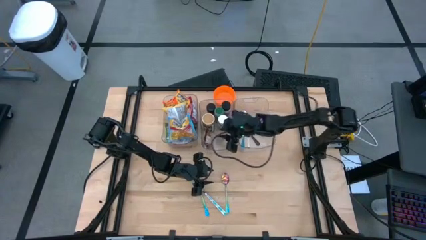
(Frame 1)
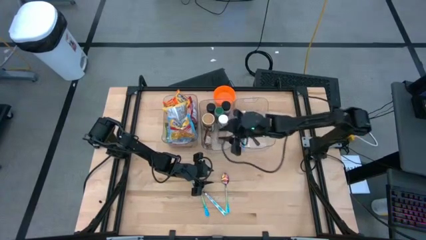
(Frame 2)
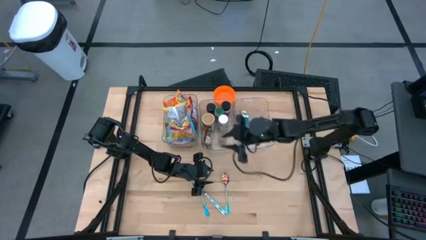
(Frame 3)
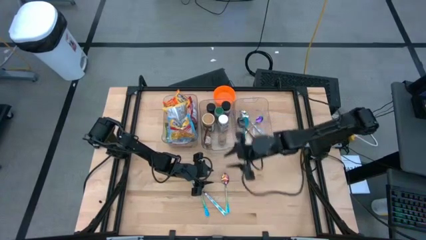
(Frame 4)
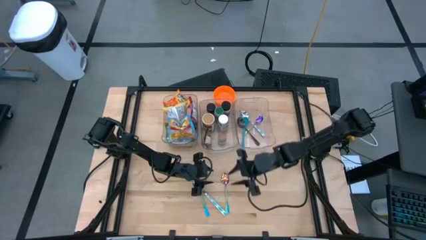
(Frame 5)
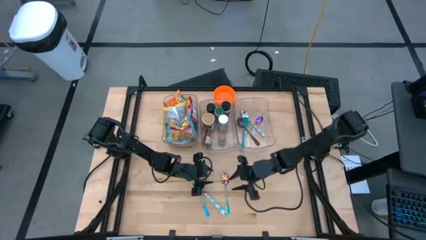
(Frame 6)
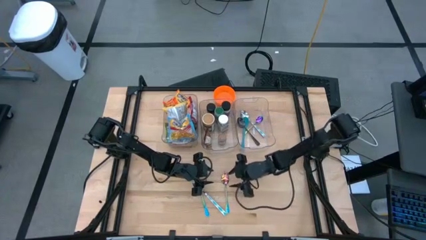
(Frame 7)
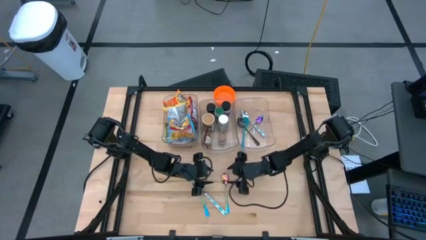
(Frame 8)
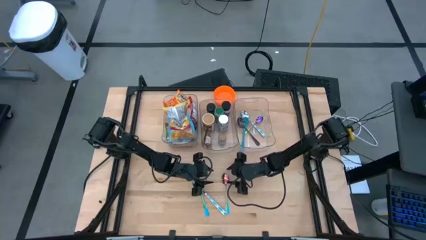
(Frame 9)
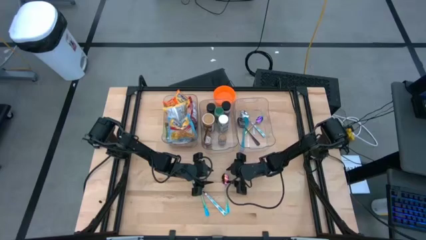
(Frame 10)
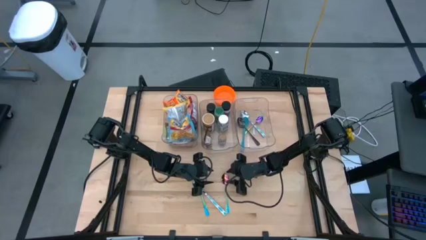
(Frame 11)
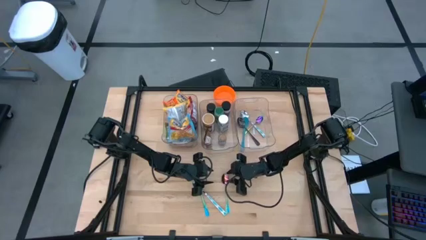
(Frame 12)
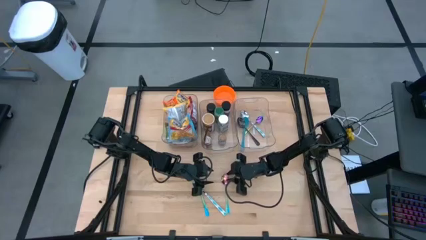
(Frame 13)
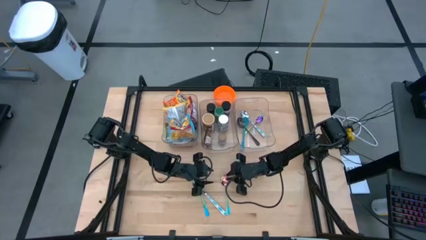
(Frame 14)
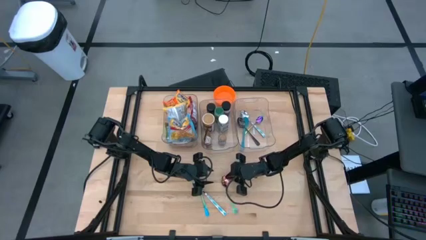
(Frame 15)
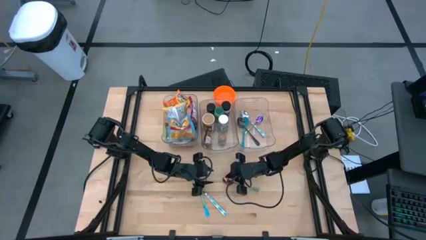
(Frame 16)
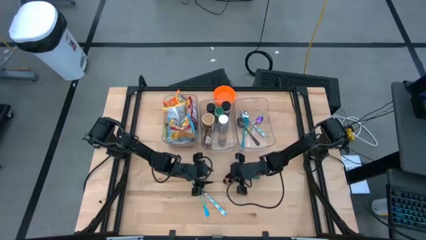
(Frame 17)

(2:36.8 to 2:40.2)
Task: Pick & Place Food Item
Put the green spoon into the right transparent bin

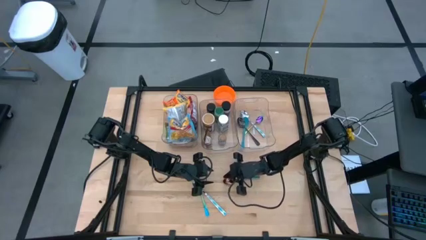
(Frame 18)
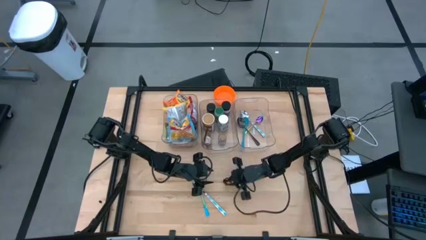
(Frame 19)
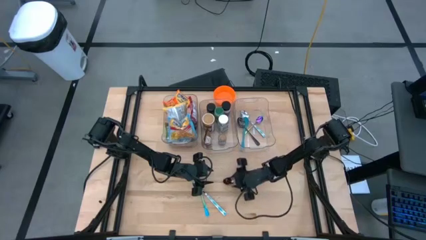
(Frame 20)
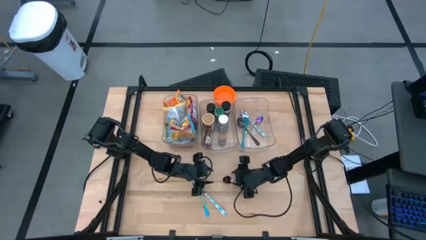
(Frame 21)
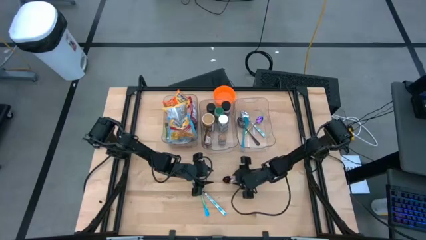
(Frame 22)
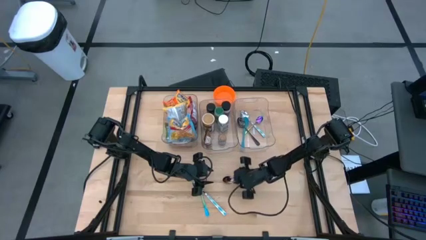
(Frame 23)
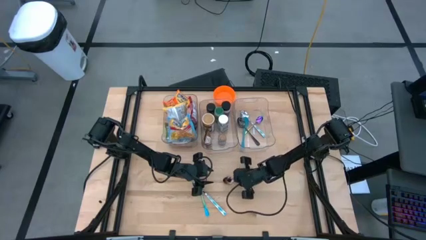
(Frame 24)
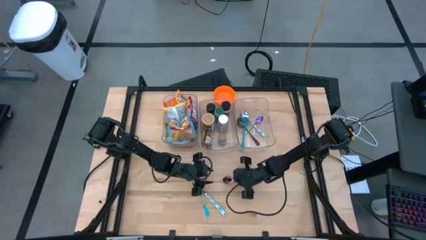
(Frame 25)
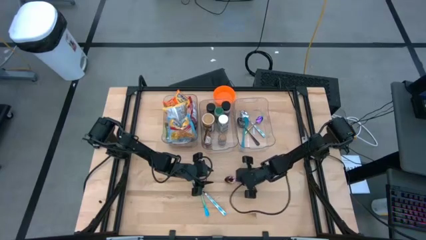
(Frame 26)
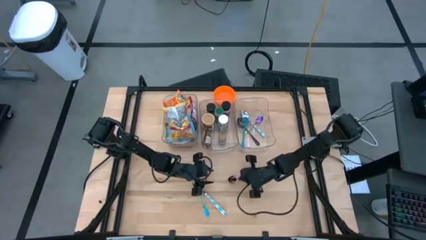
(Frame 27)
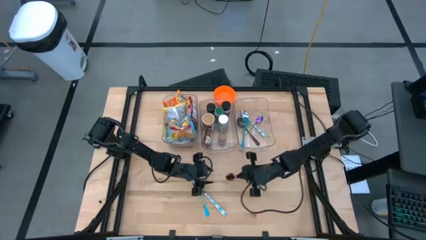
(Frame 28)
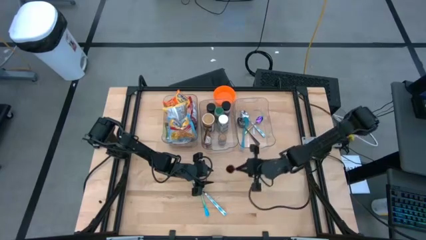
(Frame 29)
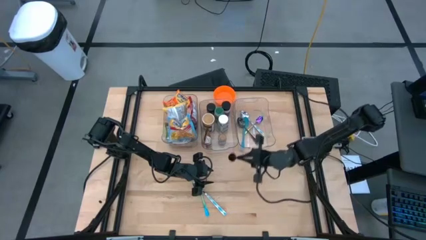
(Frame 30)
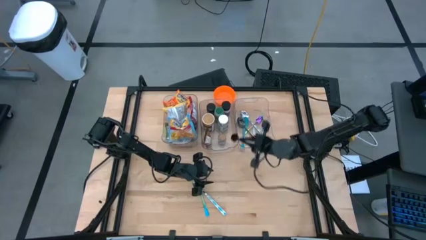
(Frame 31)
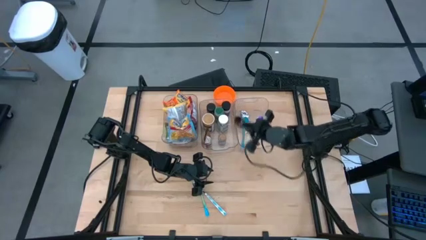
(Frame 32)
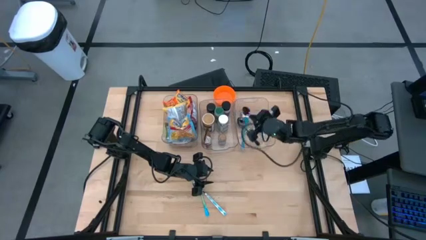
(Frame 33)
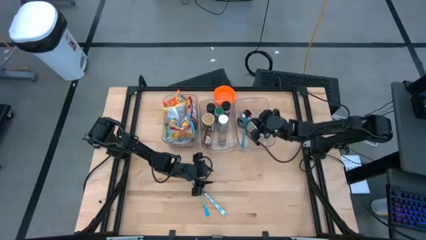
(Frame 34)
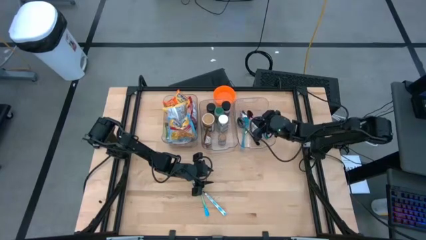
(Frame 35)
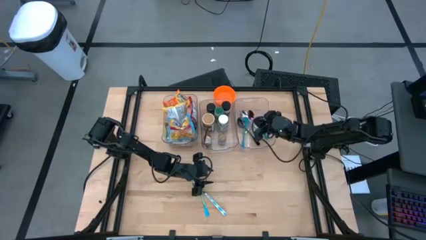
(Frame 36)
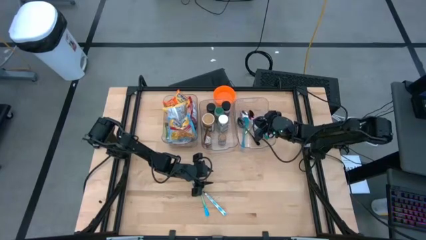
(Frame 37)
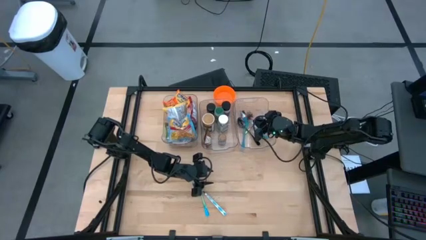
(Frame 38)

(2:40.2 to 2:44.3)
Put the green spoon into the right transparent bin

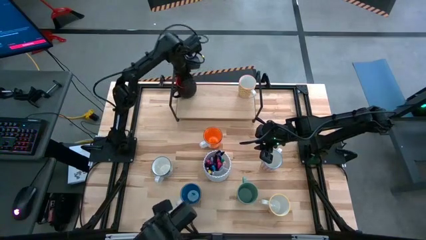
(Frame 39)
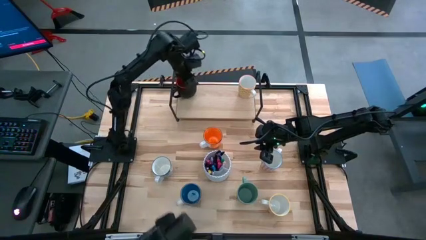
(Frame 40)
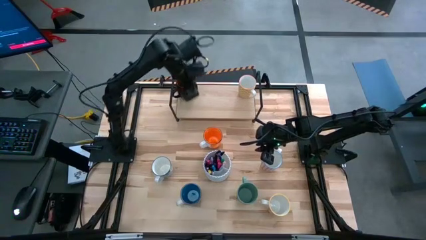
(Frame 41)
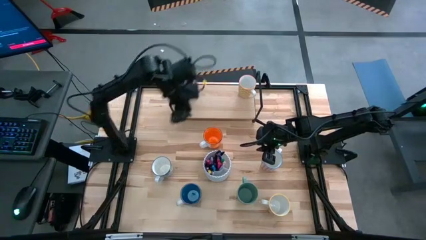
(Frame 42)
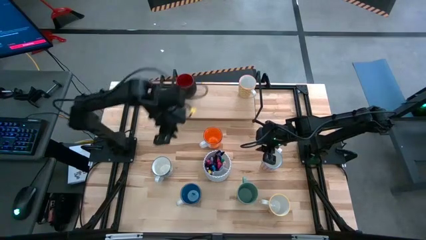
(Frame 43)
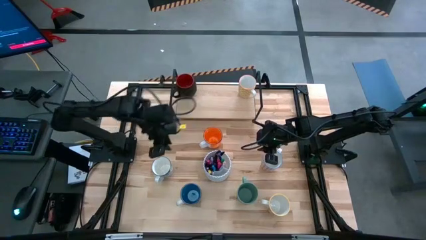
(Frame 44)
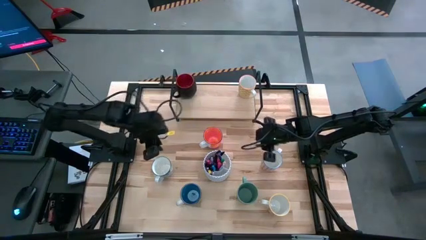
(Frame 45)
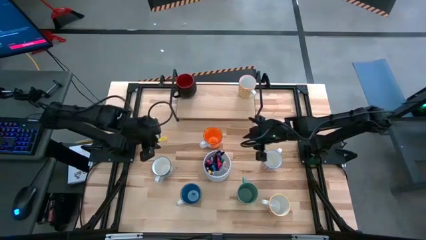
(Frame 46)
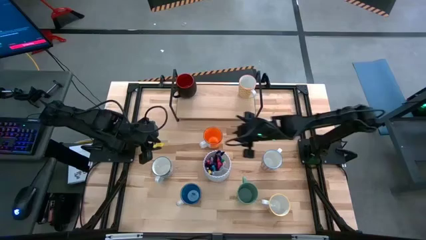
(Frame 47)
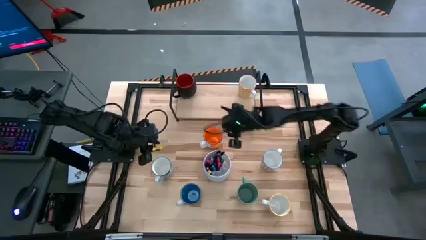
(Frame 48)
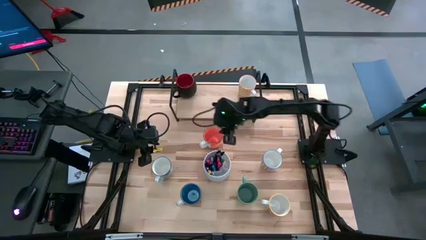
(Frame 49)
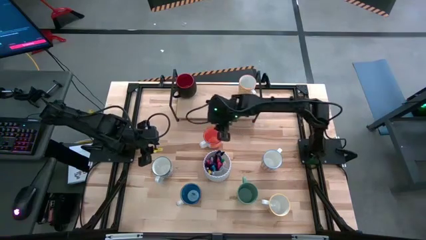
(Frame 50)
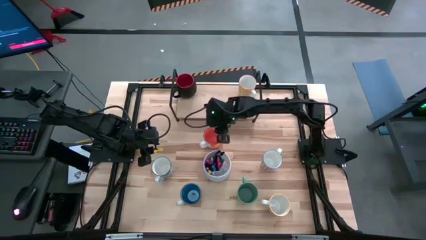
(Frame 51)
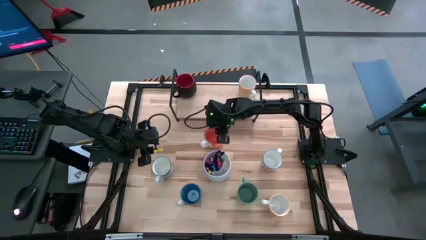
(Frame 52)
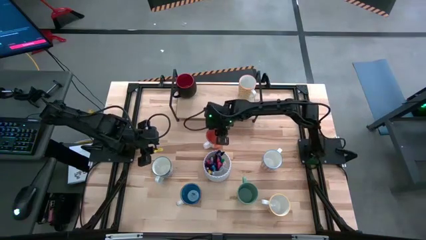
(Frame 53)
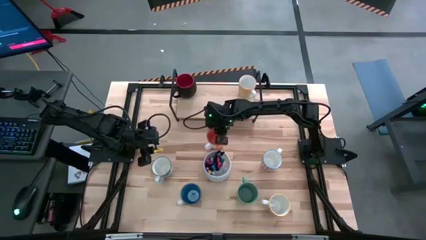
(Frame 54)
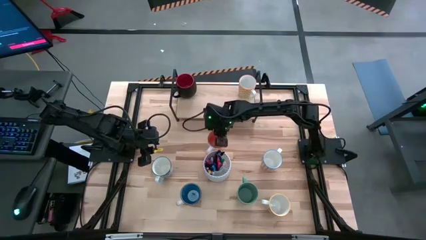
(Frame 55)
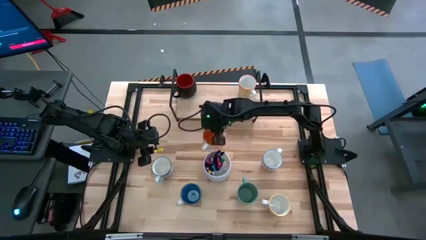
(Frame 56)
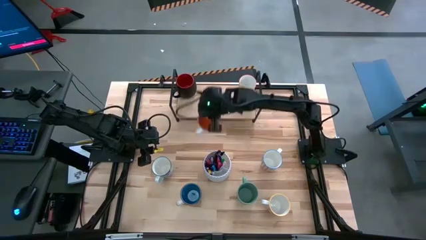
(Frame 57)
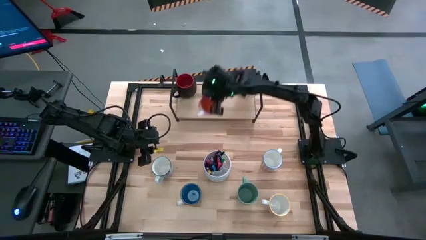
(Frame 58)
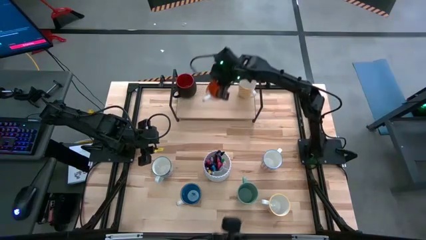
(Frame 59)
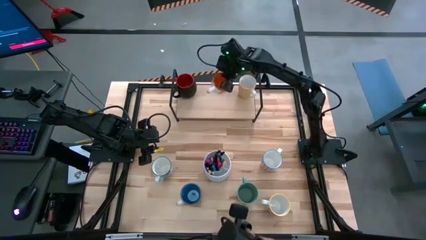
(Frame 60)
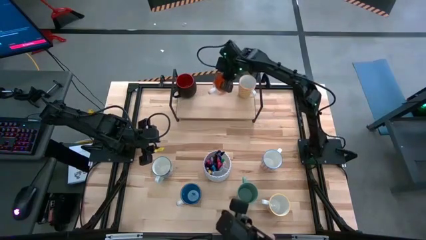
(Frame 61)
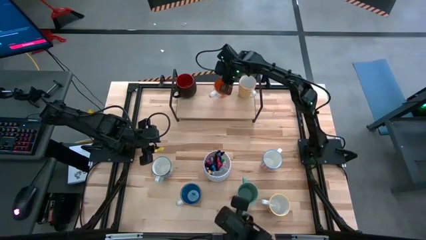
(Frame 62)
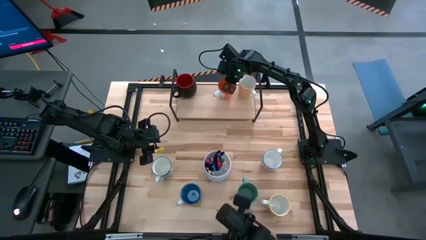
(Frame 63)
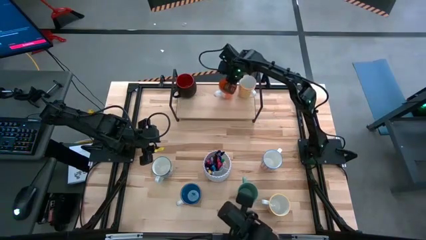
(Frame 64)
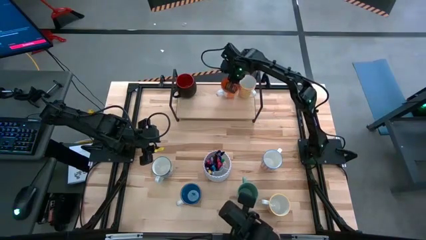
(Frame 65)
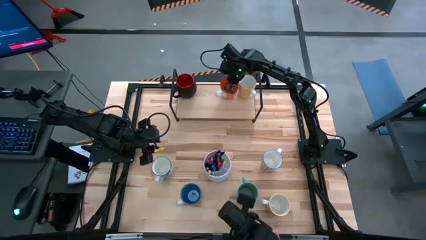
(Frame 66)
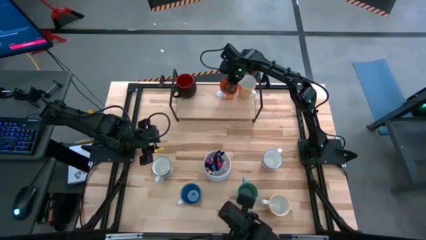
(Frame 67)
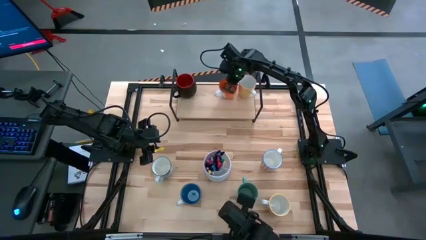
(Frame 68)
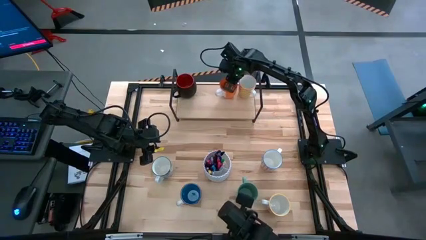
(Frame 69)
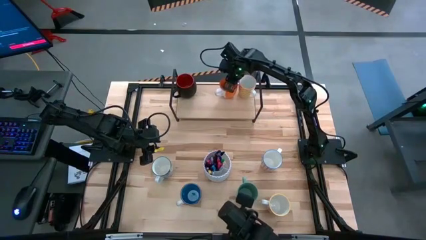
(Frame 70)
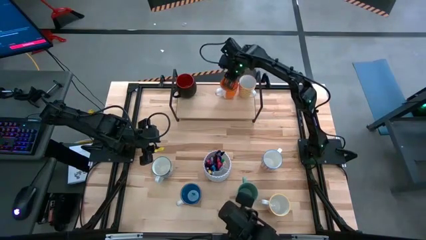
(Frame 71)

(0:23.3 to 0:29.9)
Task: Place coffee mugs
Put the orange mug on the shelf

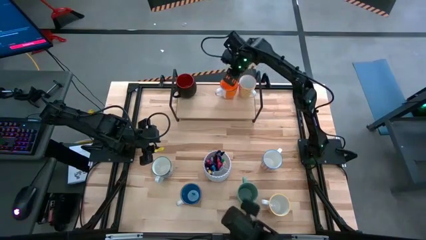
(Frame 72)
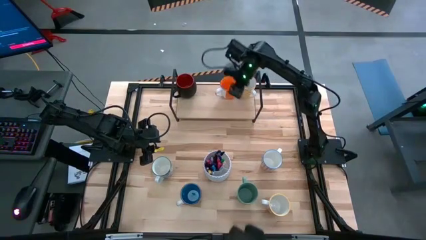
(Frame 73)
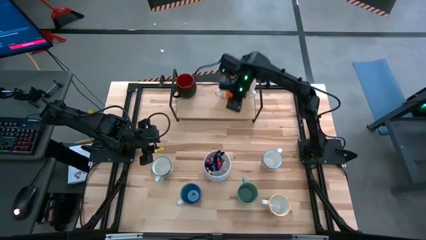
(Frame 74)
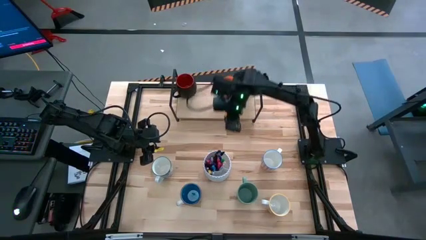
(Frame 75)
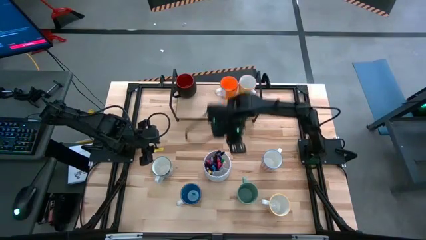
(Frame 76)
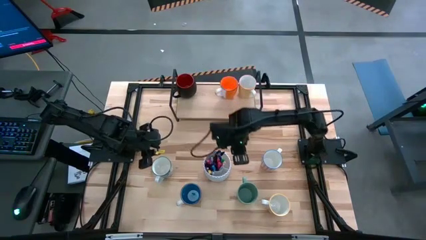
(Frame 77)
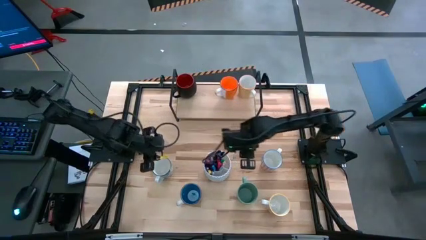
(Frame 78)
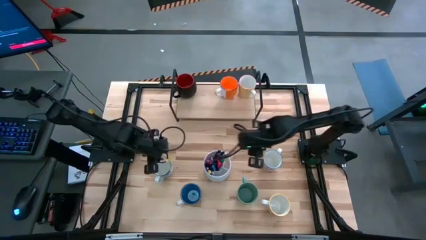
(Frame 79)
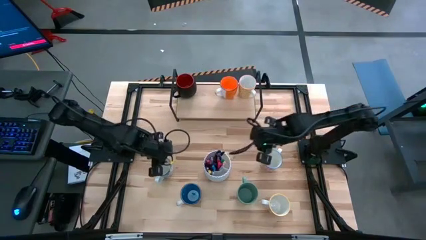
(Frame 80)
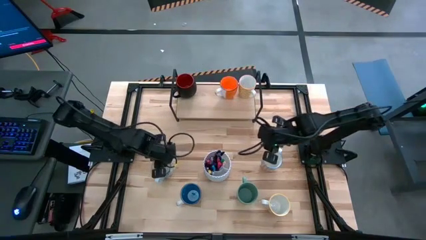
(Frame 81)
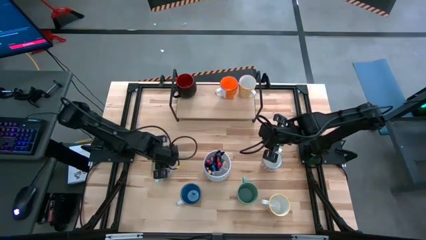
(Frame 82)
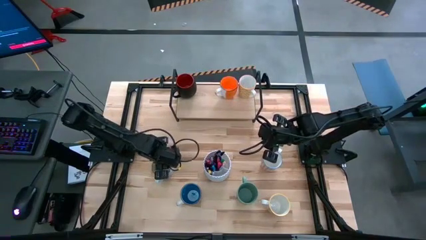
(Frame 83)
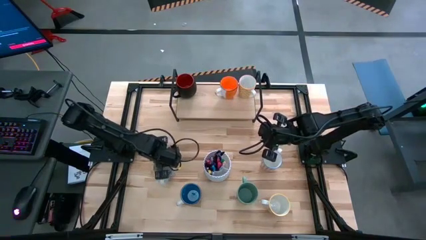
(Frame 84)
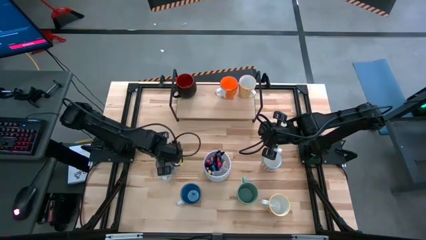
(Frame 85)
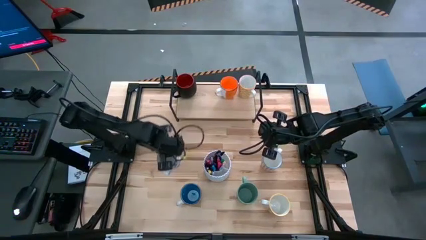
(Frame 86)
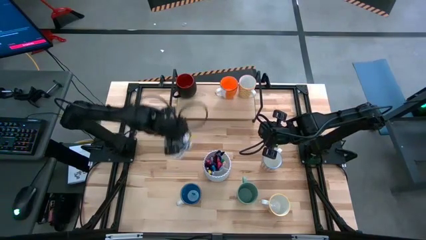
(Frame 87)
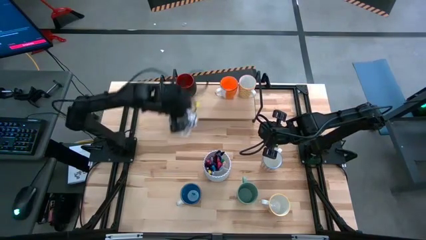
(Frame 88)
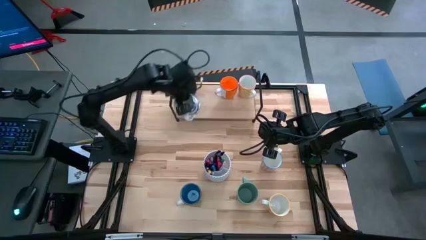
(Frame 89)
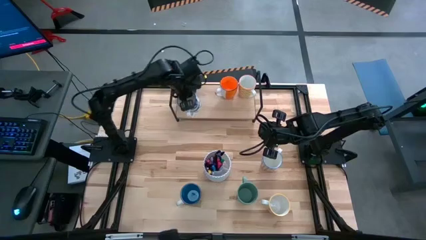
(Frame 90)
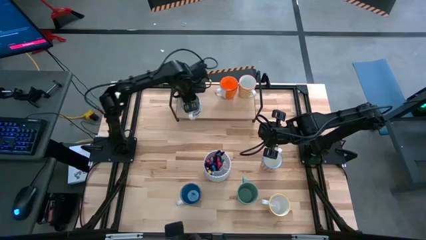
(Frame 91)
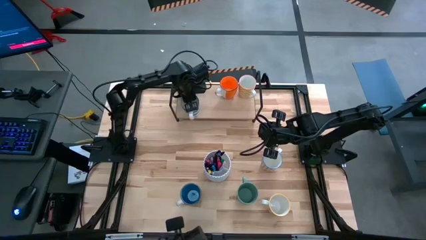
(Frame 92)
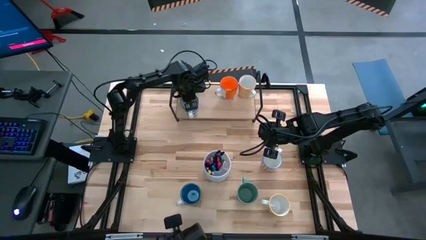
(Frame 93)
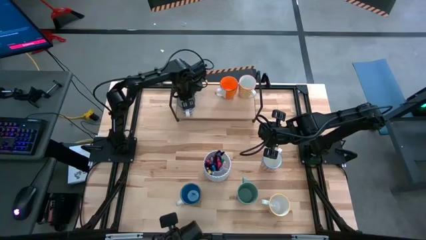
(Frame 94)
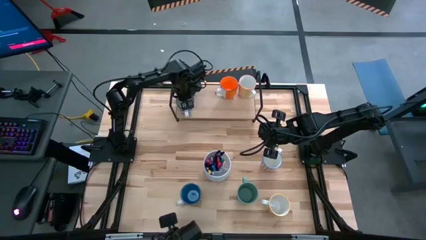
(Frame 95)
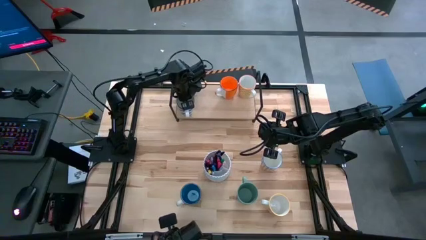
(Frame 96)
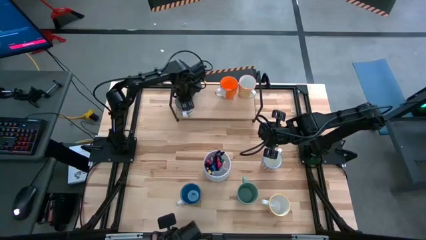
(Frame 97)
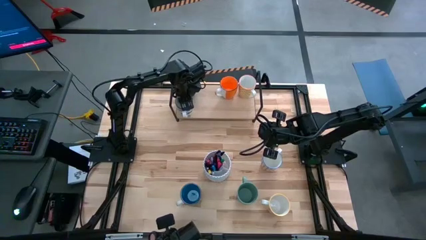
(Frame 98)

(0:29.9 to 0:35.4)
Put the blue pattern mug on the shelf
